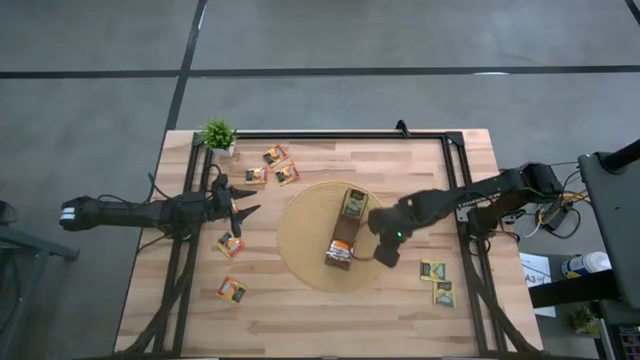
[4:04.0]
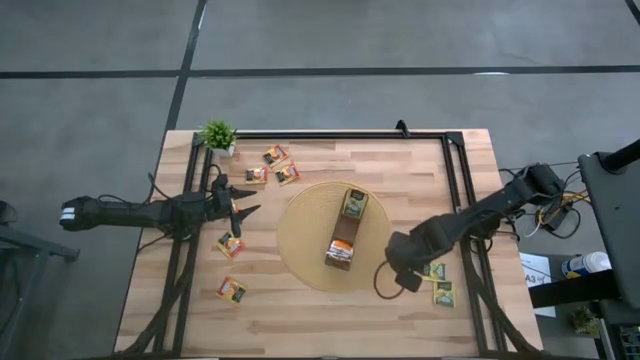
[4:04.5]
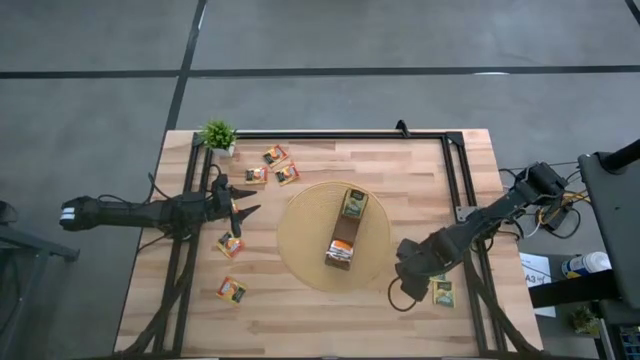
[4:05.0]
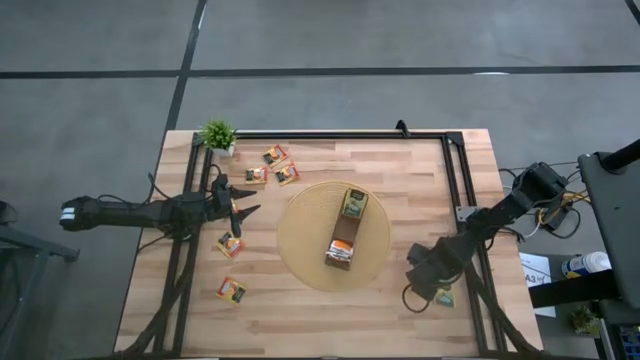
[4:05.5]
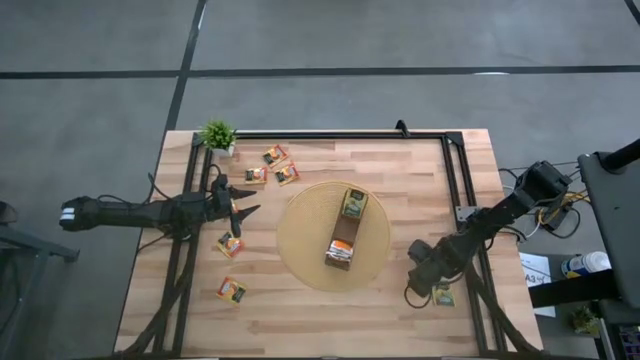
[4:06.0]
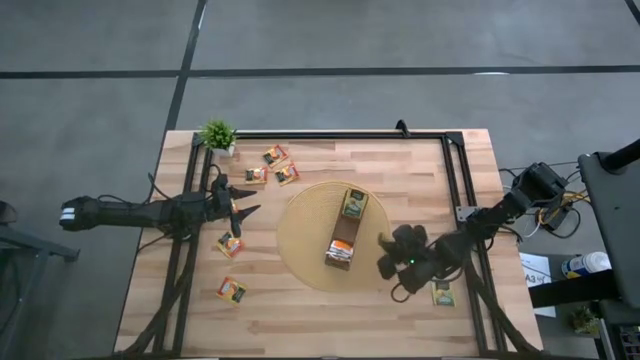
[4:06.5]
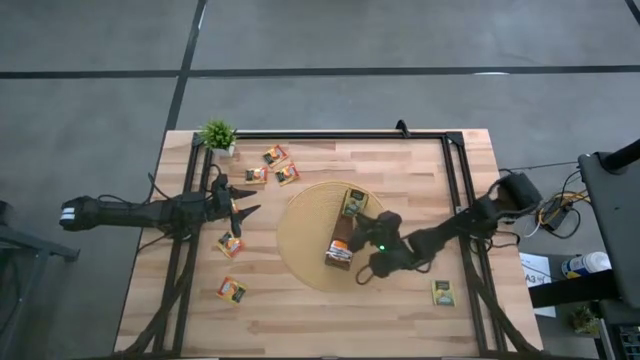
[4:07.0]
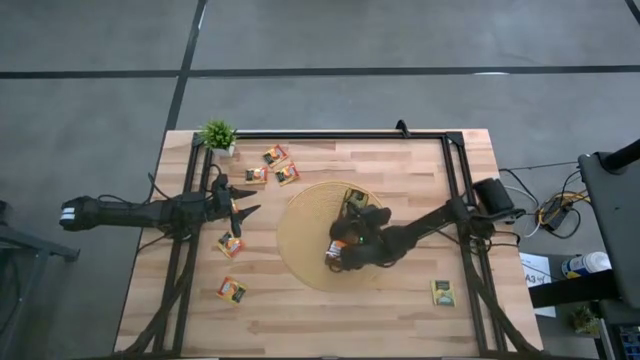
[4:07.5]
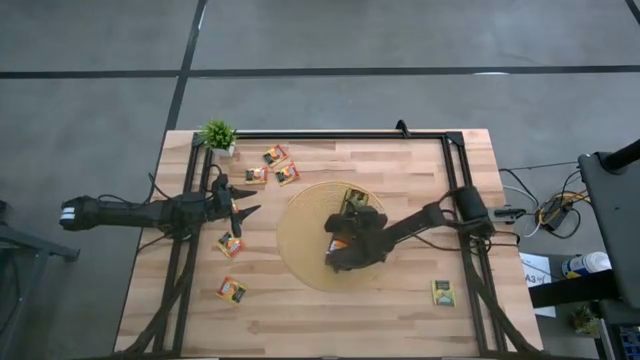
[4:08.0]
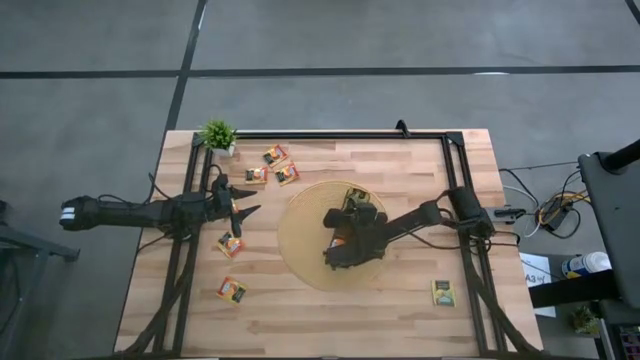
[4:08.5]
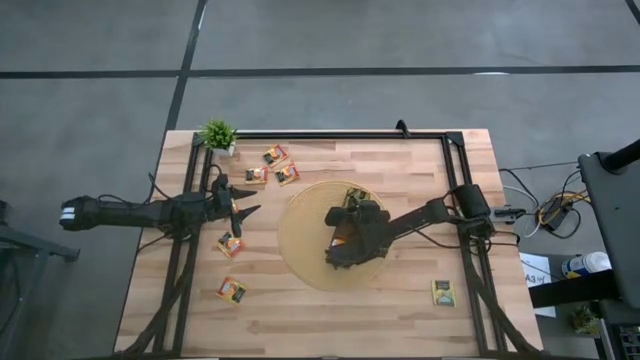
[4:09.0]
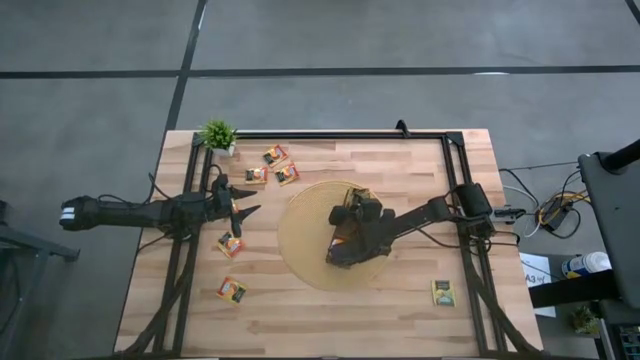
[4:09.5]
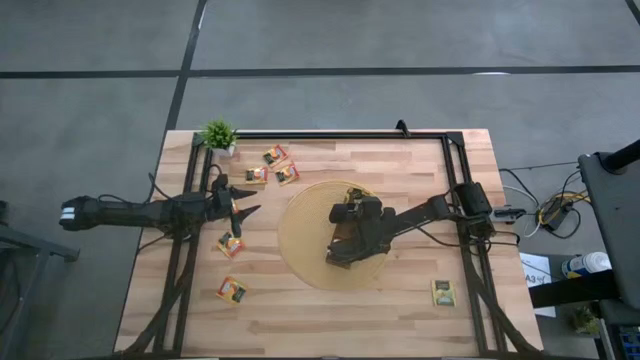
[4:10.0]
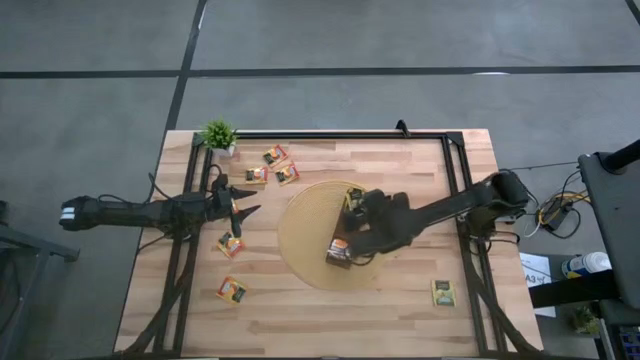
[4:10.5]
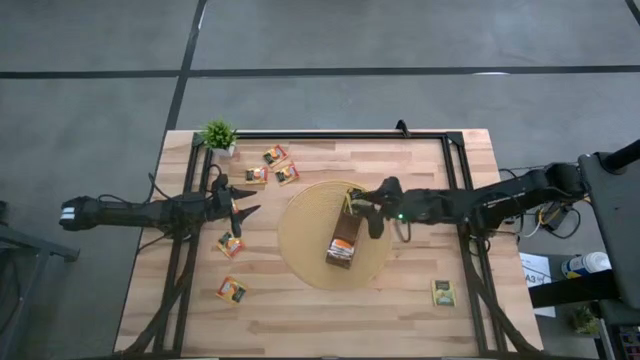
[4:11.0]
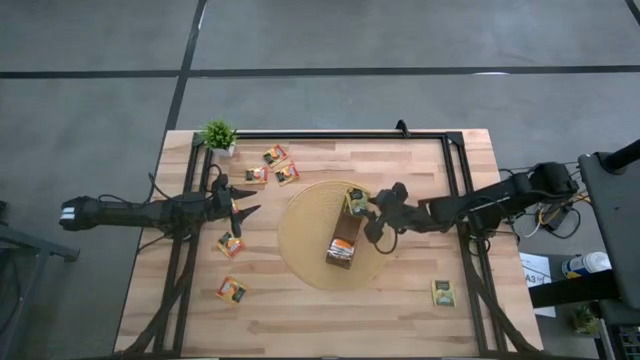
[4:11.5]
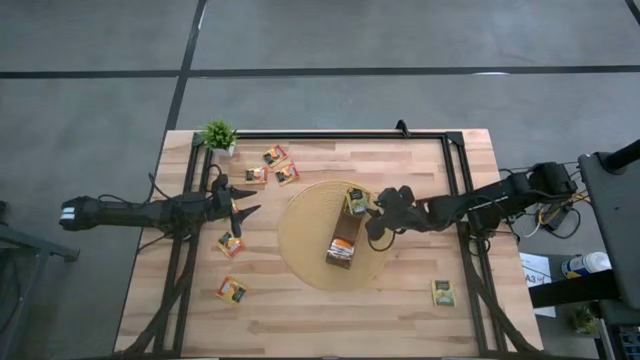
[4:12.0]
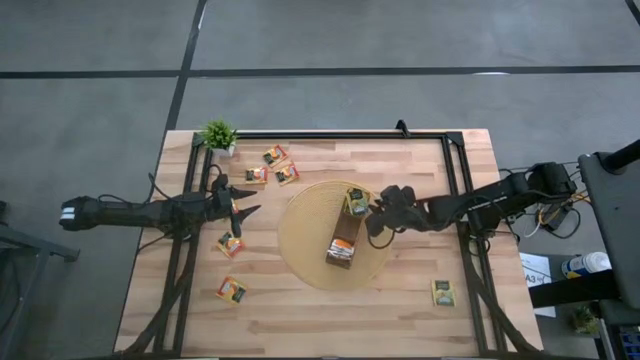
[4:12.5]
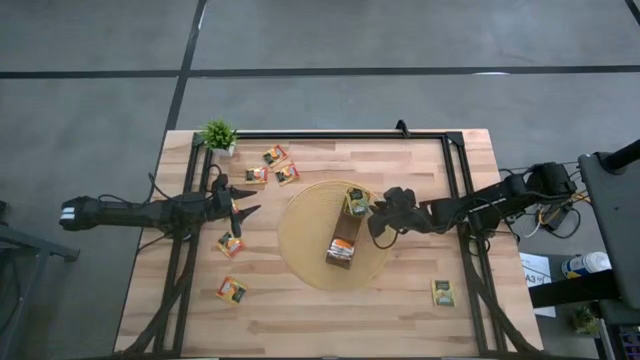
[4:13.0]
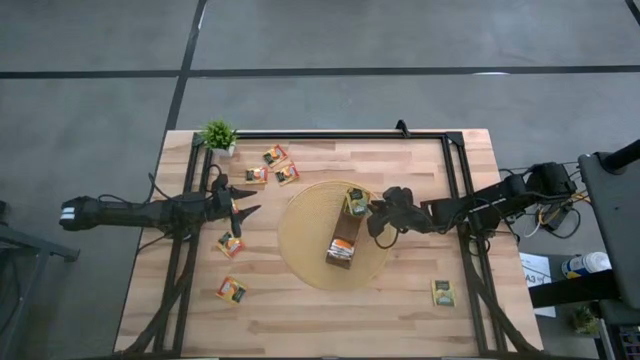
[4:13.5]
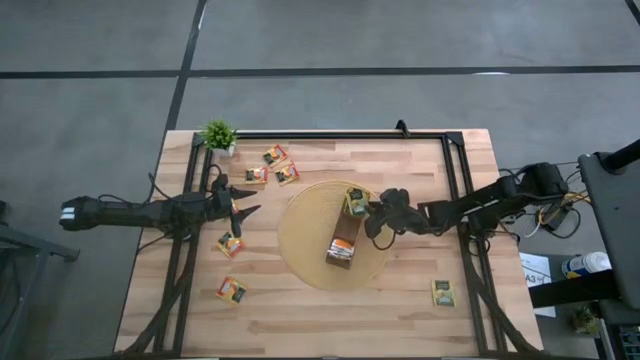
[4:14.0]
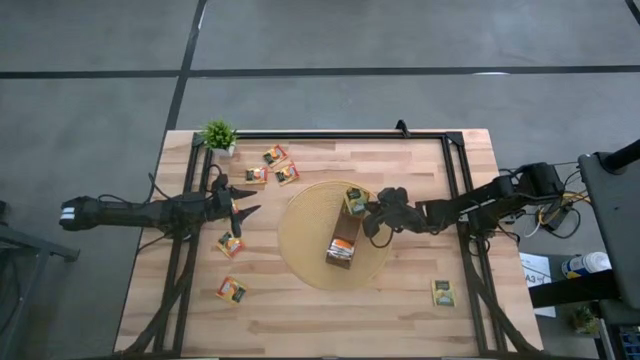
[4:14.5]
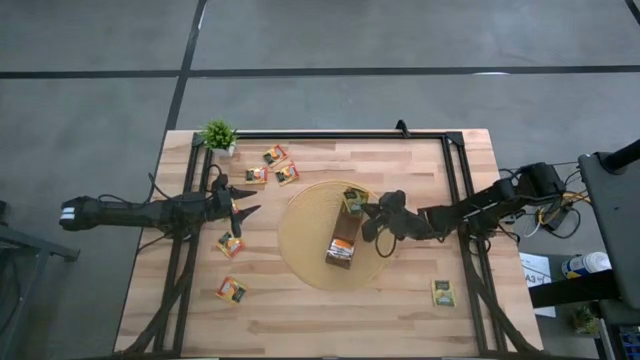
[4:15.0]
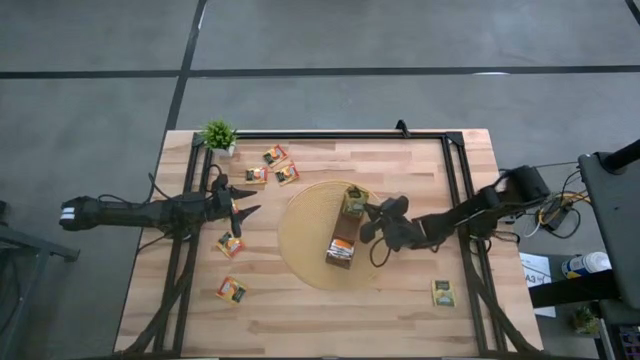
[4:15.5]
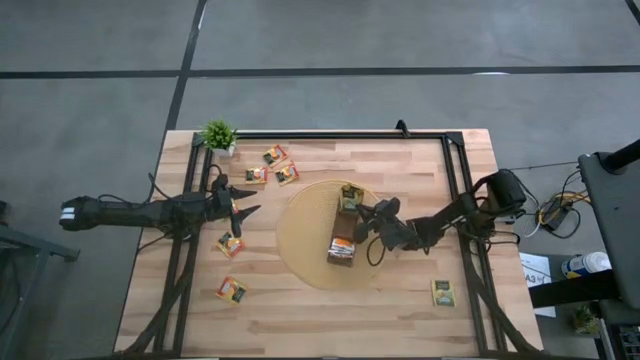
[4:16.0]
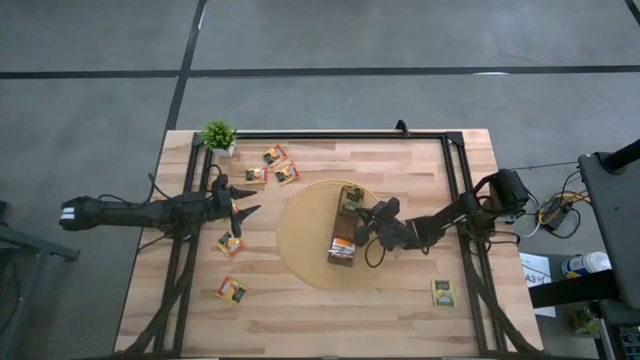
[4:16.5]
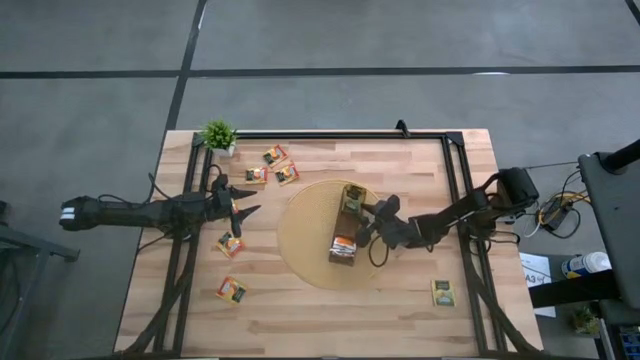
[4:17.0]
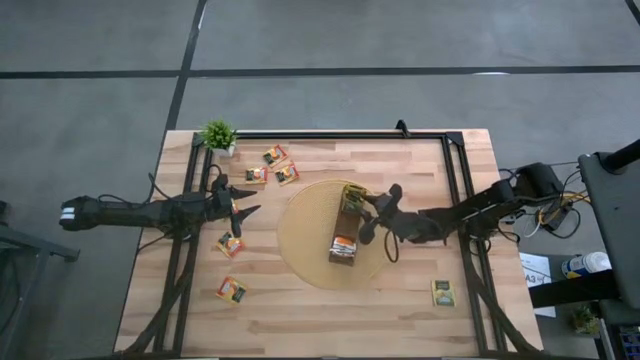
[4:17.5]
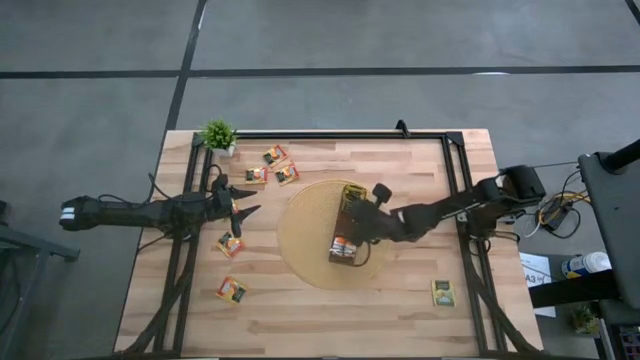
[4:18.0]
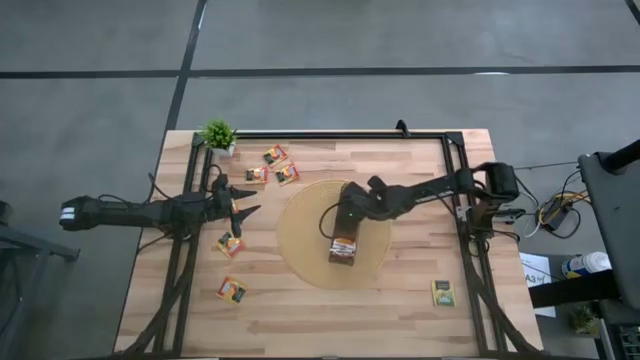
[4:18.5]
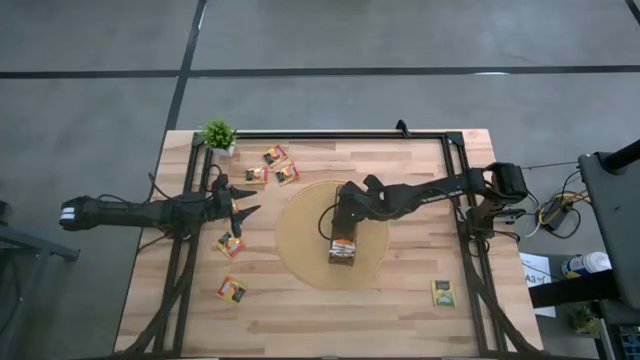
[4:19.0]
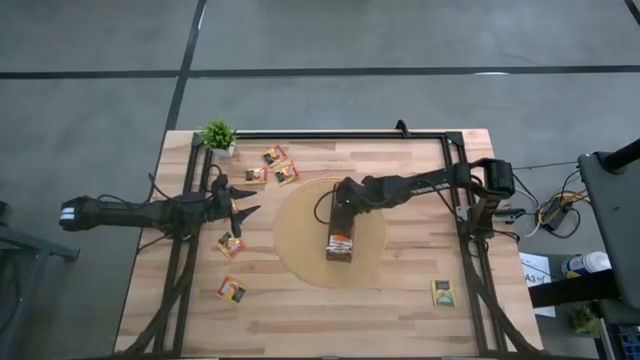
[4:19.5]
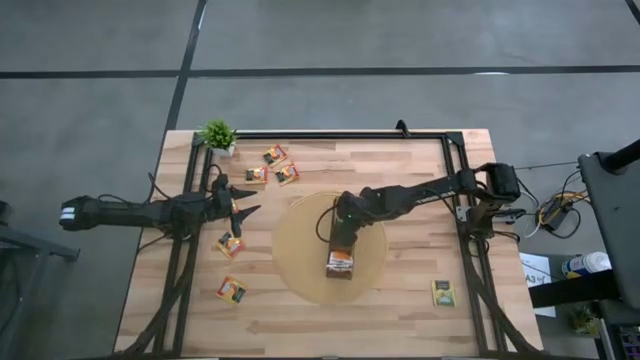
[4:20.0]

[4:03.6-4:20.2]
Task: Pick & Place Tea
Put the top yellow tea bag into the top section of the wooden organizer

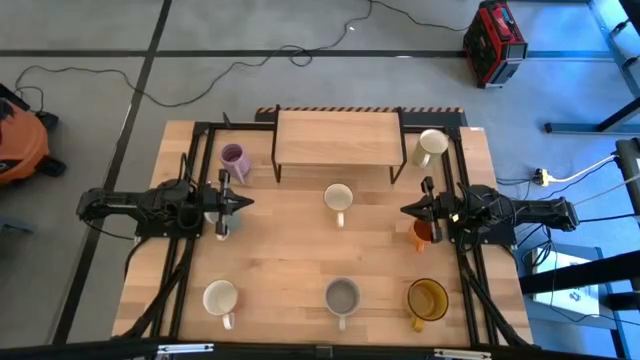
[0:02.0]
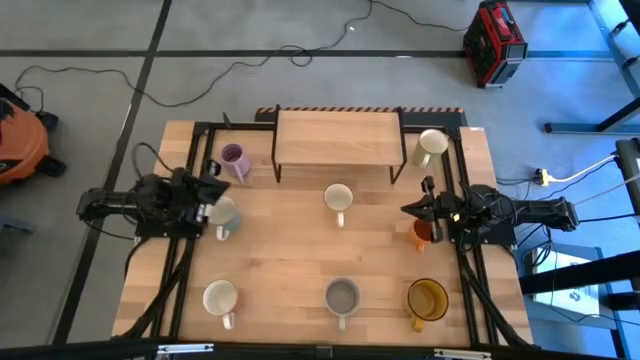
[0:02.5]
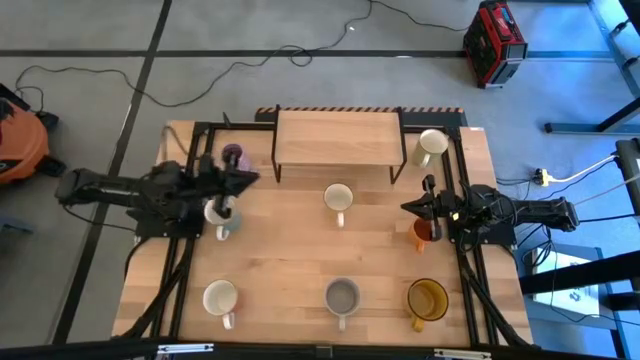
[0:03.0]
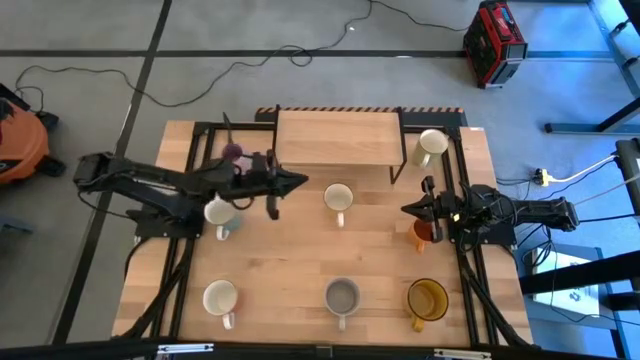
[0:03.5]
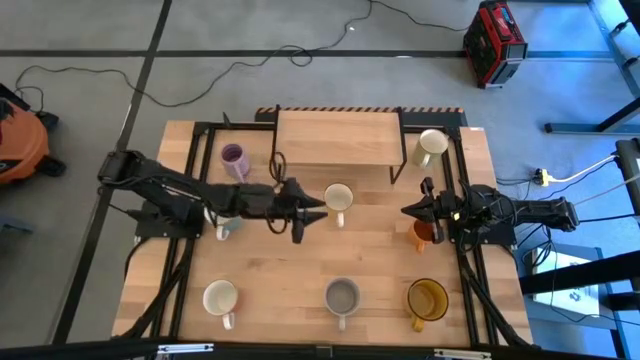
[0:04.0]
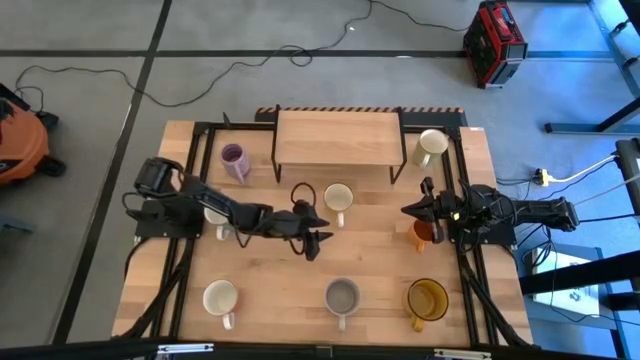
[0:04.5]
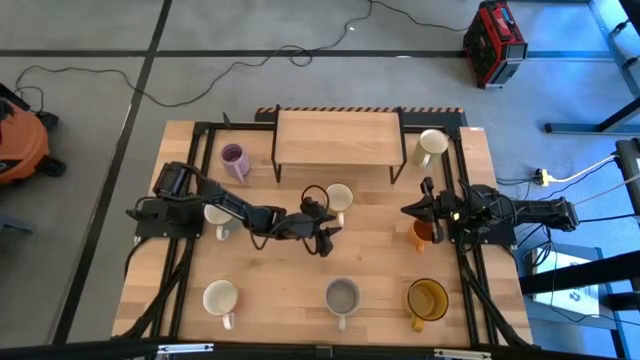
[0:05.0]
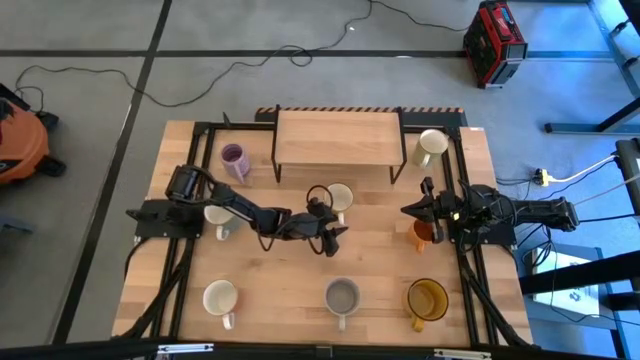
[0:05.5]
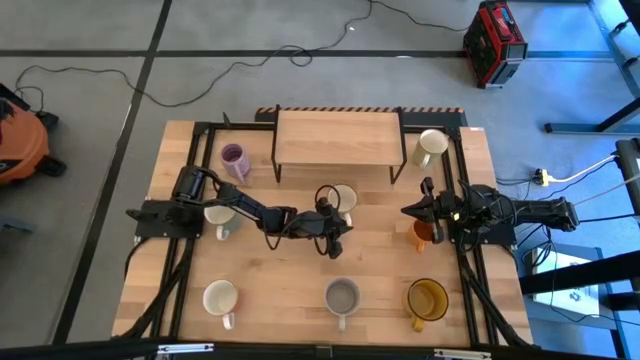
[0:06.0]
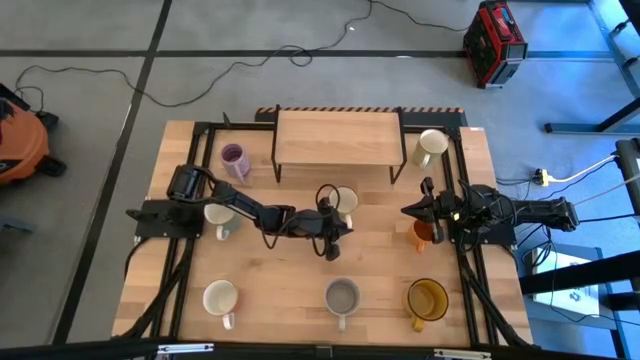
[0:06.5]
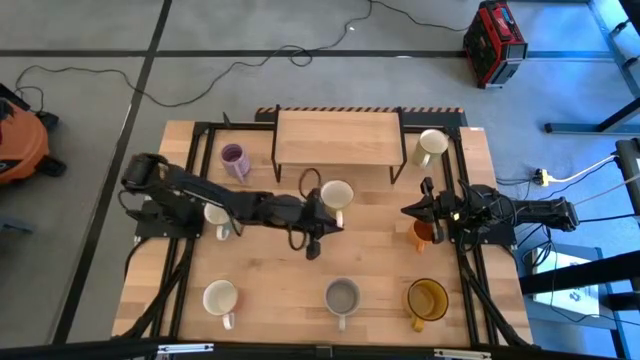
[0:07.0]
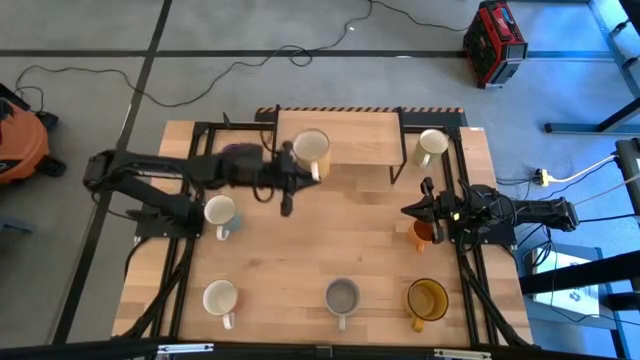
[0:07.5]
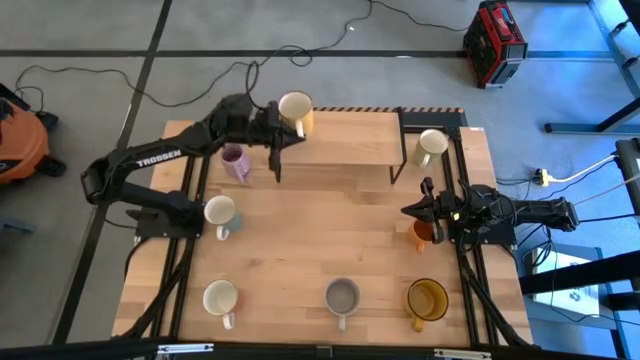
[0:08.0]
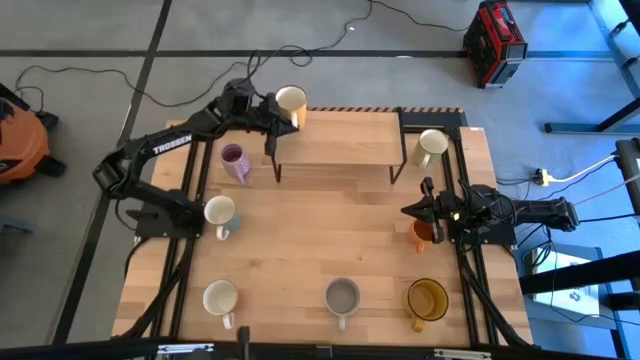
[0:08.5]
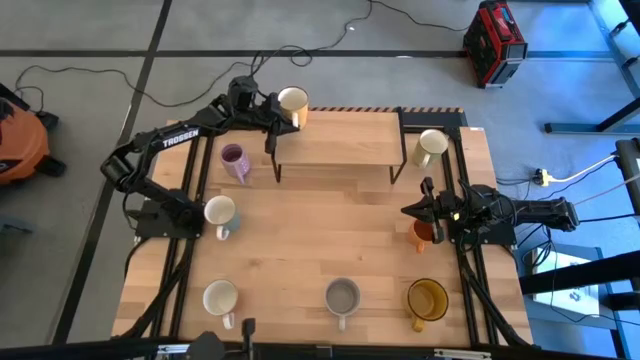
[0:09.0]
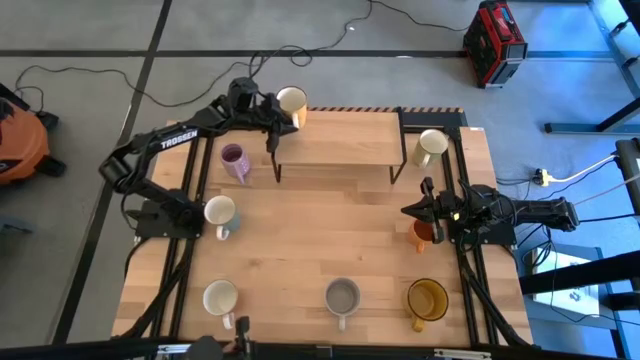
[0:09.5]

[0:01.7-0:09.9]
Task: Place coffee mugs
Put the light yellow mug on the shelf
